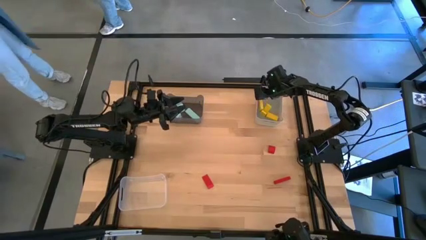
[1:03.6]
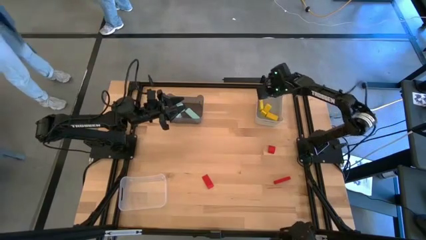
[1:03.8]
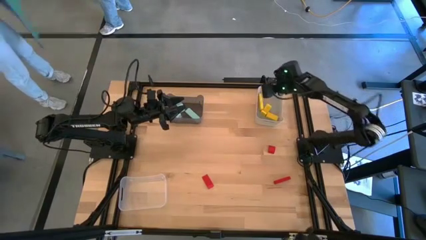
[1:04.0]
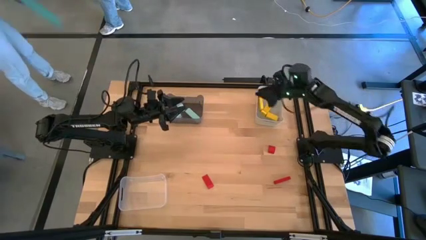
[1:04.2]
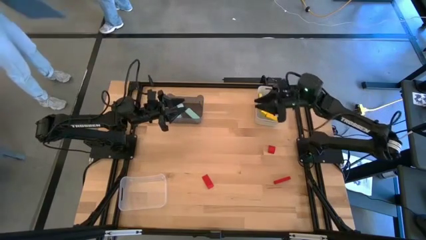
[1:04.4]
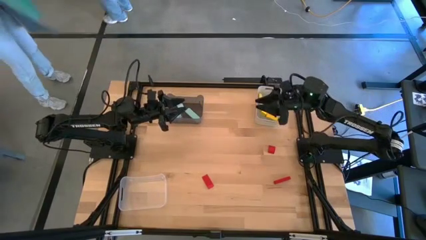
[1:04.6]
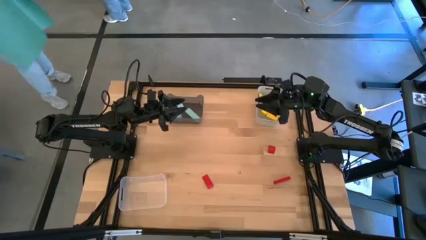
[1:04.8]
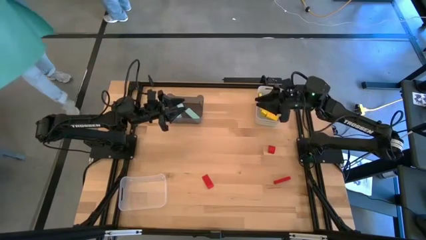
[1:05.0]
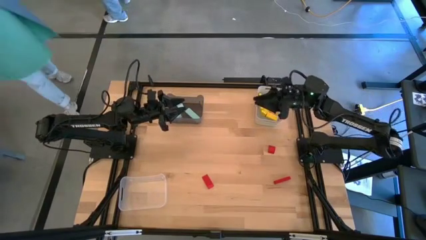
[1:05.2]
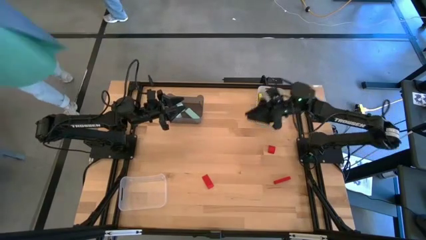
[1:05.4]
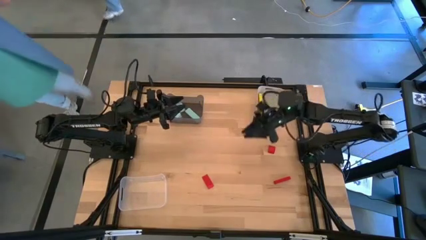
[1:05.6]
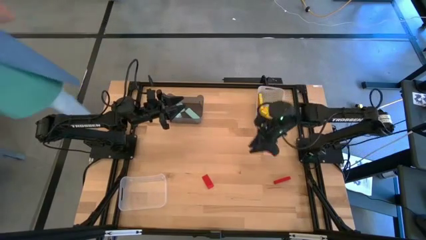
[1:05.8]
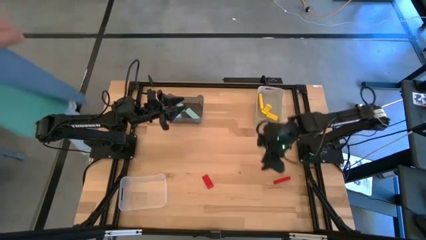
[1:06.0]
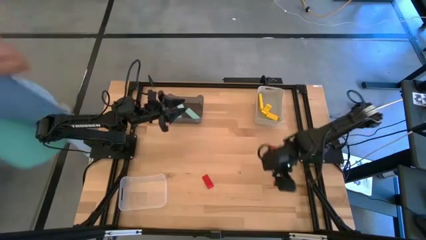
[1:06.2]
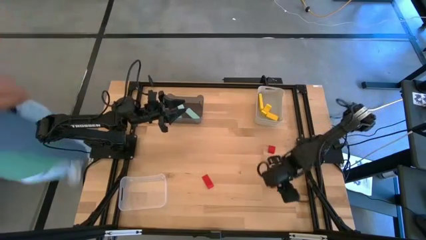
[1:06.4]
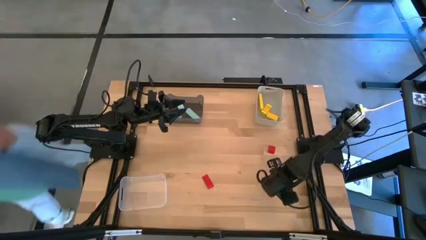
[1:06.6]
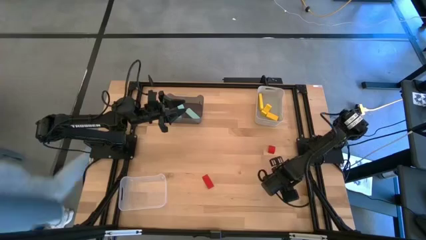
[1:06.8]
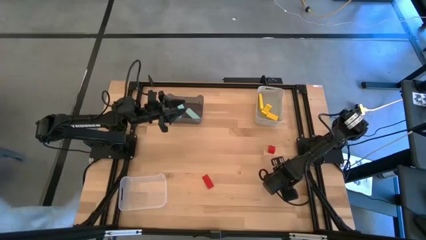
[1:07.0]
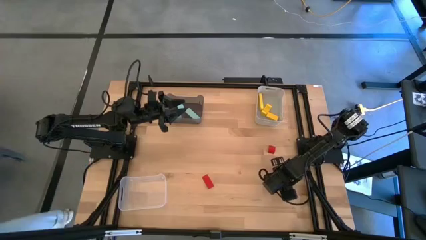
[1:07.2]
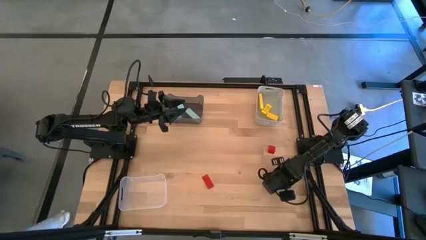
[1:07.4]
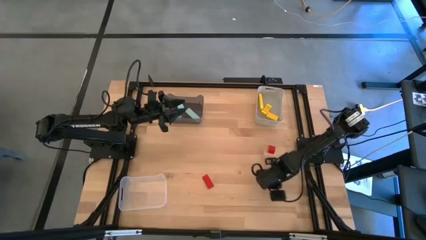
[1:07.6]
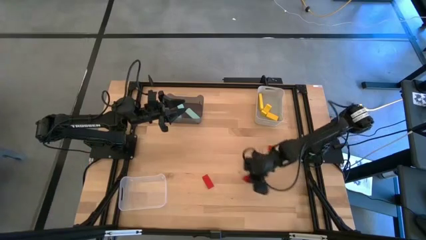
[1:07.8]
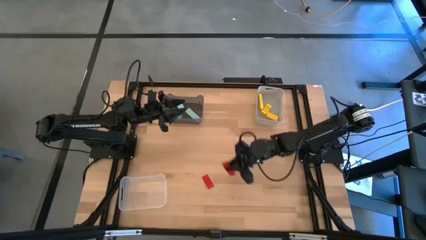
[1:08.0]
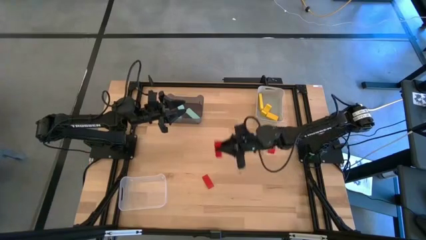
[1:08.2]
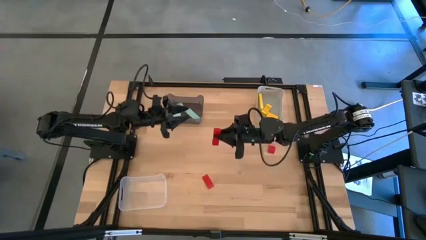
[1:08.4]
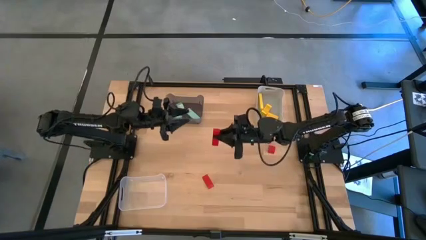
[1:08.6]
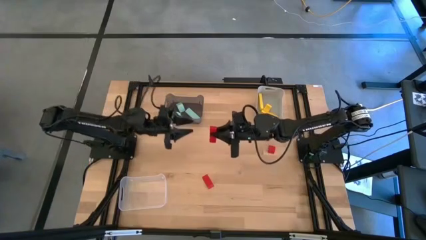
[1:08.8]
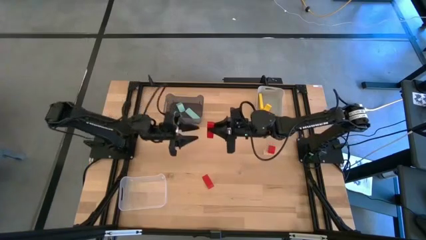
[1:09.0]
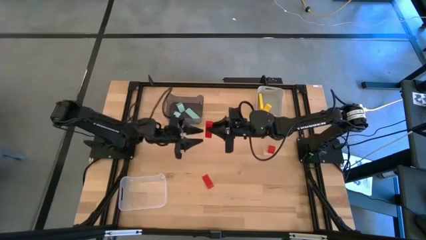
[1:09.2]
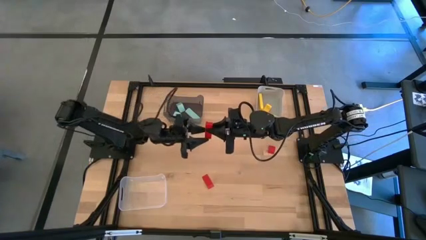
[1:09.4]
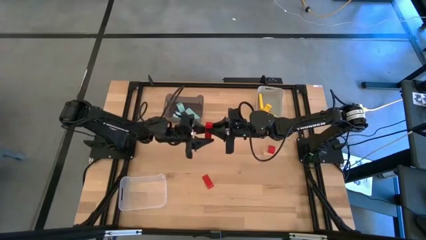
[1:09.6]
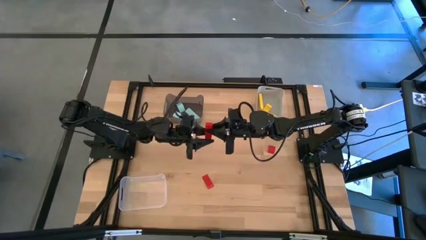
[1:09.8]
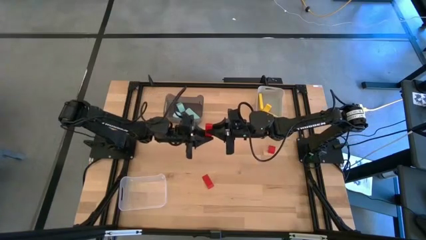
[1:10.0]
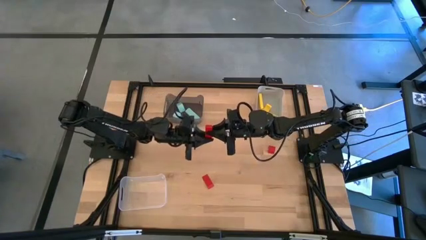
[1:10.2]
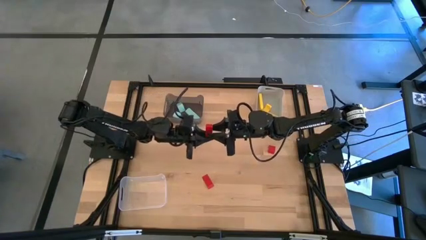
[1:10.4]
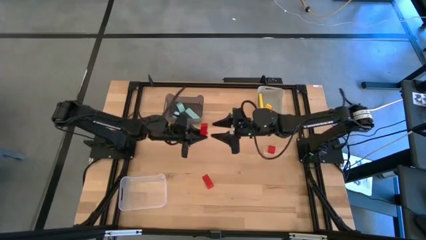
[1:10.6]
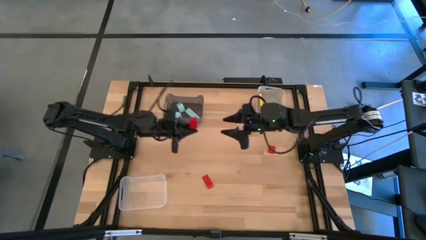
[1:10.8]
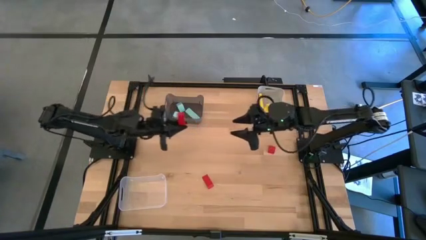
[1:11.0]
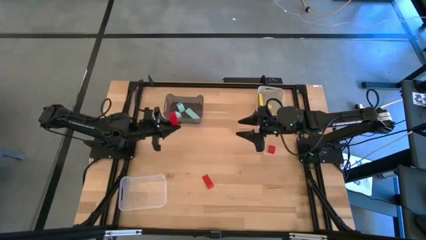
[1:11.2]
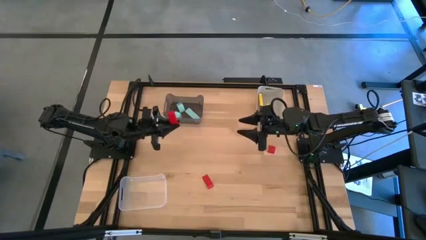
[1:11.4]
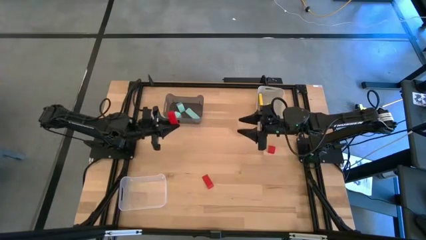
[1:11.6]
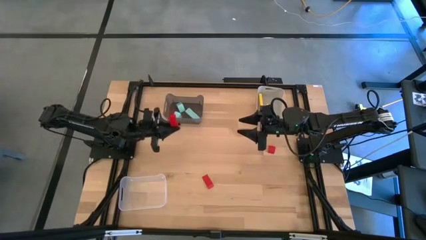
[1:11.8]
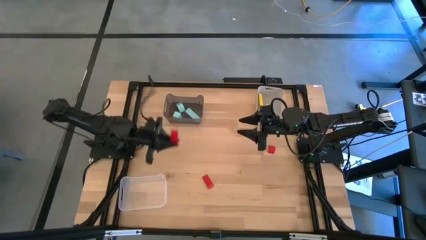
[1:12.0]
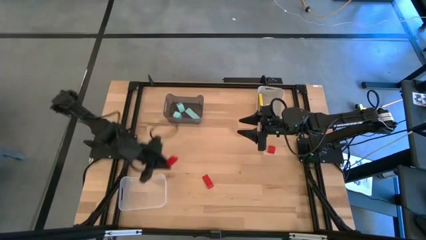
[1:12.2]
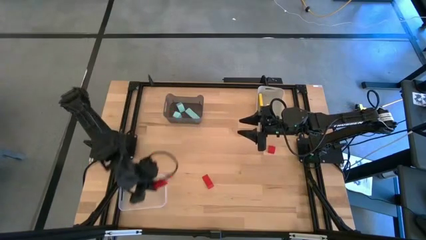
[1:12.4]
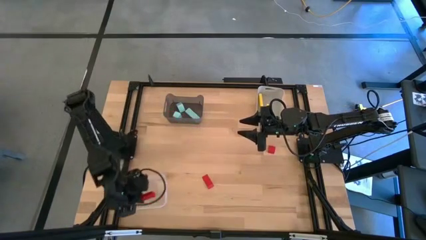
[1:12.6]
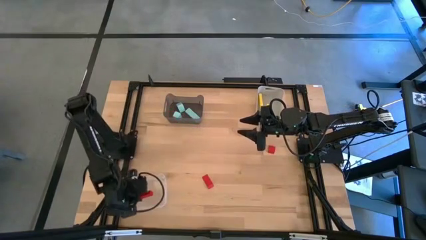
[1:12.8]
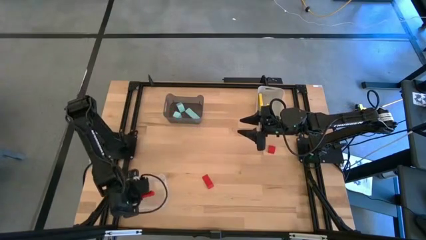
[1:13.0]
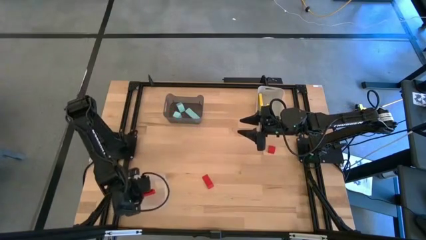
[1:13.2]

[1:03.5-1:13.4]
Task: Sort & place blocks by color
Put the bottom right red block into the transparent bin

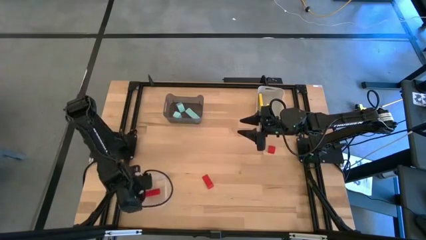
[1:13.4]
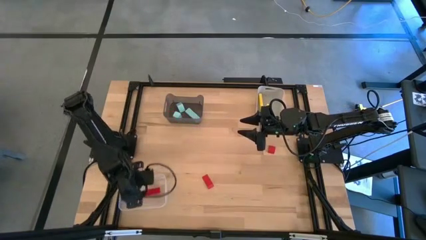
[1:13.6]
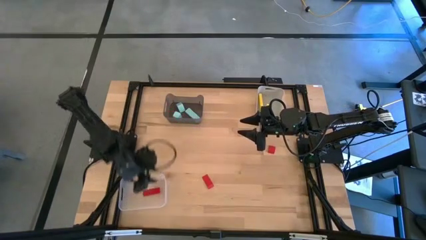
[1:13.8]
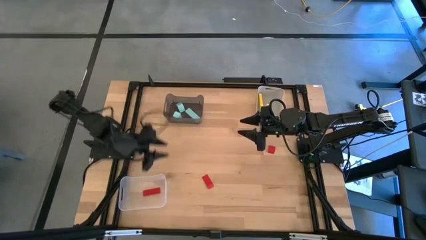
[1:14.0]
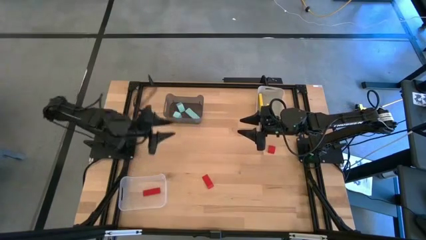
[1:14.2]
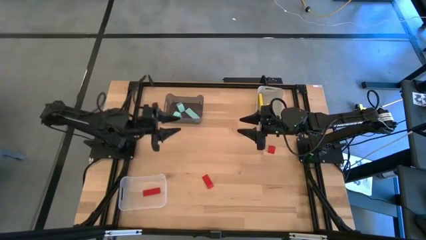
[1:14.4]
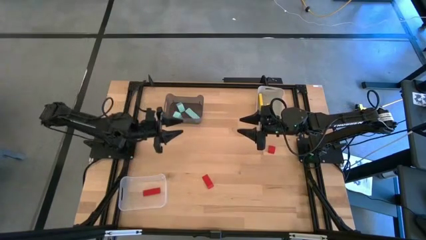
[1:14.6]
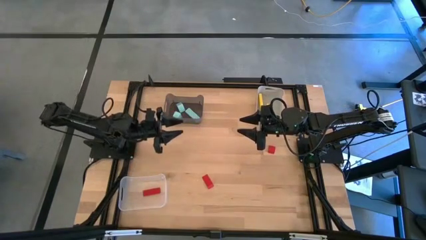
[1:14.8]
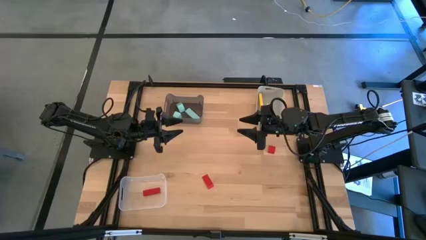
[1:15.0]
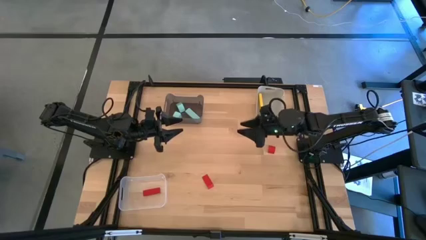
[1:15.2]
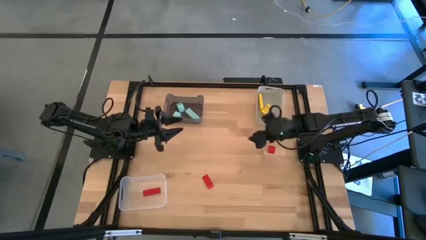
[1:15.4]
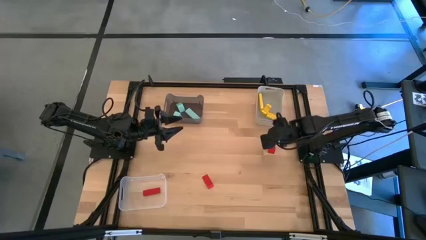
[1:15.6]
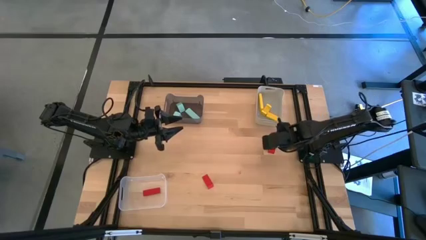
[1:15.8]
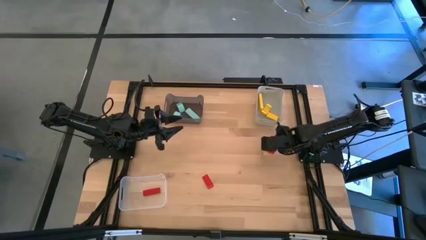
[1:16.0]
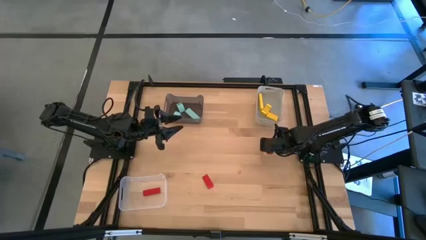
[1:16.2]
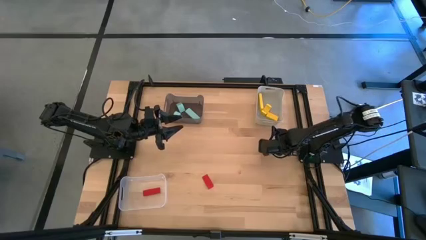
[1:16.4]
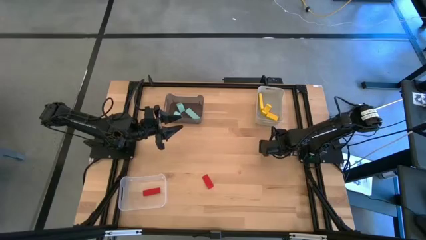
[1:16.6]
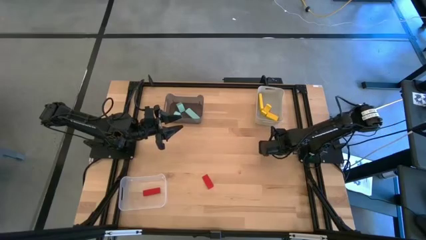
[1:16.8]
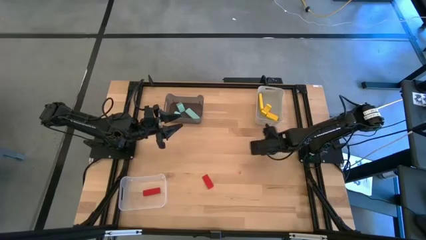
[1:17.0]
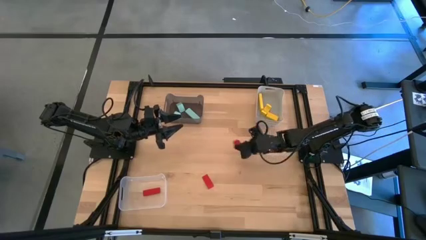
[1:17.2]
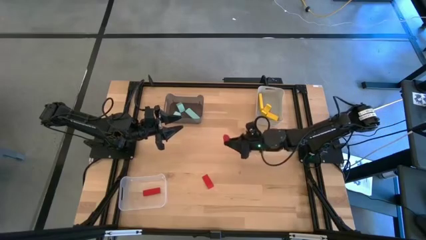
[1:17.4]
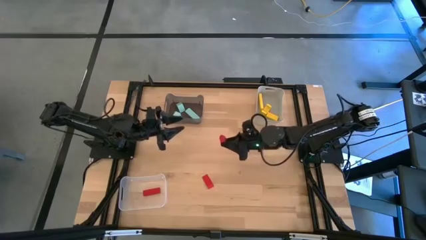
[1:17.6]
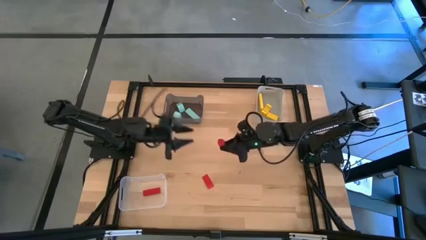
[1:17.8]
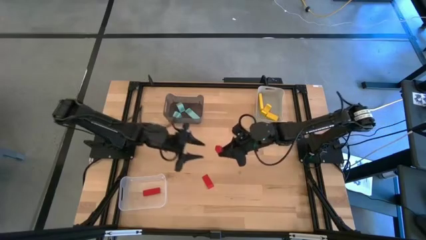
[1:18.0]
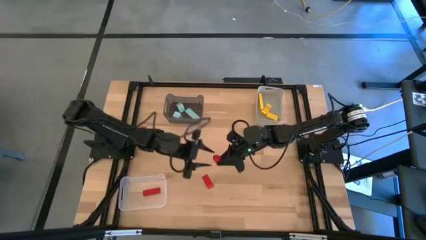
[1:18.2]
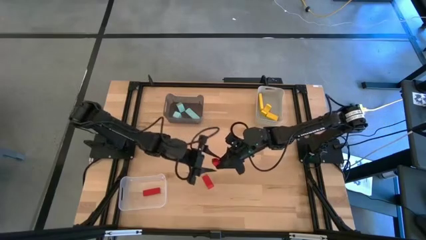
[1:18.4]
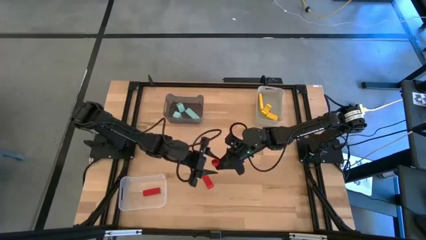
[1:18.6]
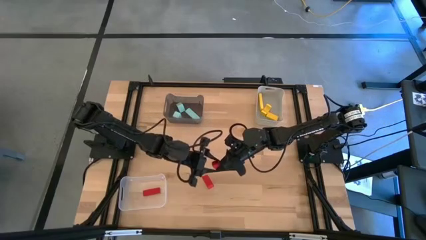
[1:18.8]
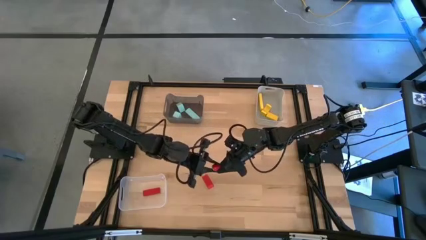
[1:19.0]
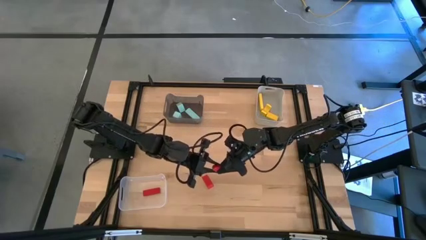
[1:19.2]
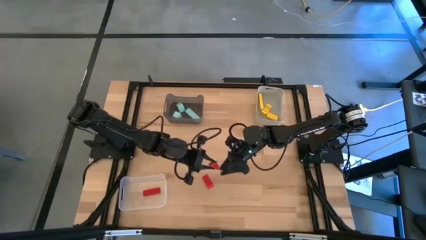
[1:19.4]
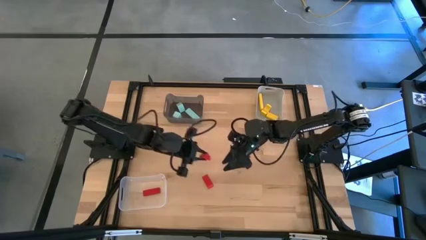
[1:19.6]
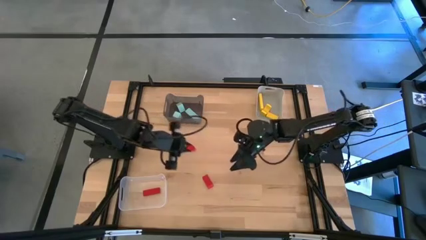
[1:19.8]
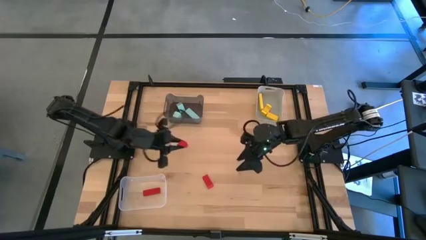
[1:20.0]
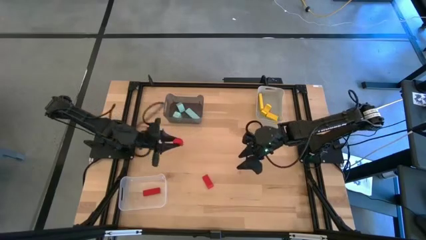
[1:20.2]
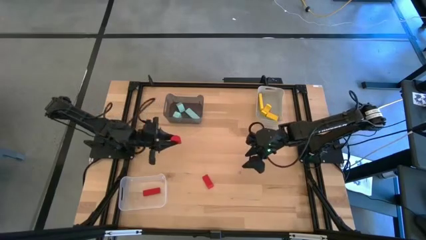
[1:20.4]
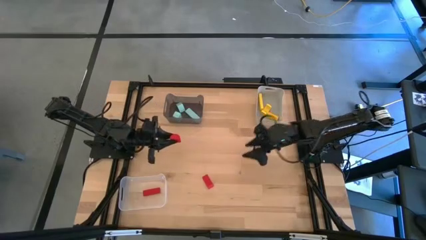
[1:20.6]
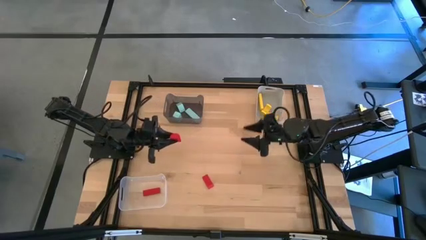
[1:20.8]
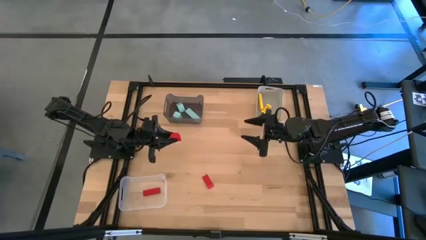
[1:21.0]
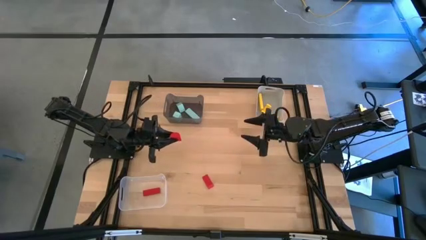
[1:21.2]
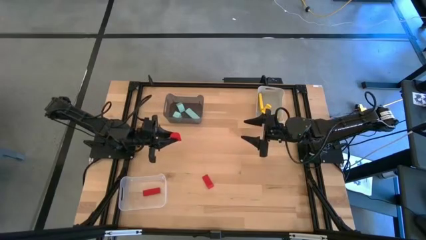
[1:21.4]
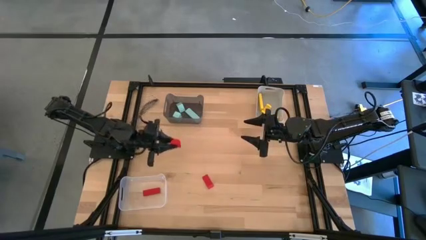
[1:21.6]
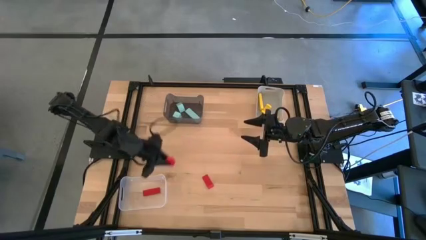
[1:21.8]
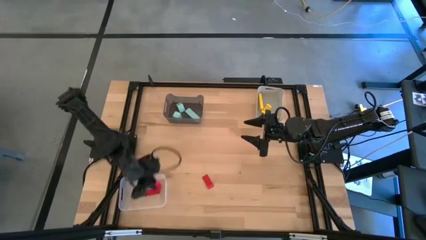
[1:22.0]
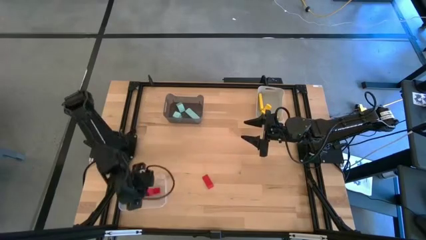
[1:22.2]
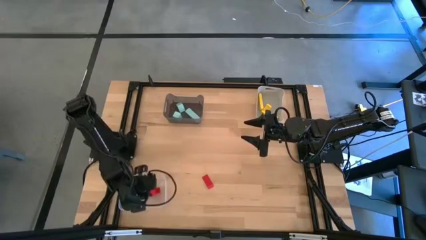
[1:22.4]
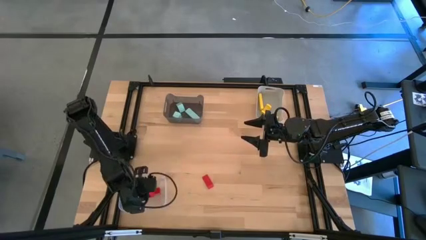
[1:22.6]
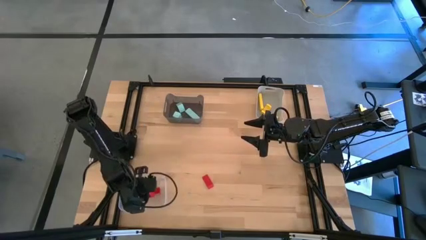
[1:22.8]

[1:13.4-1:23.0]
Put the top red block into the transparent bin
